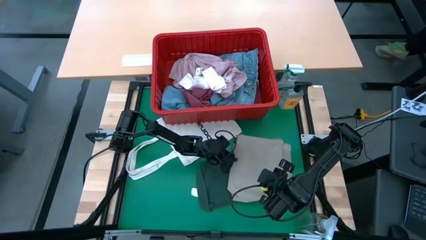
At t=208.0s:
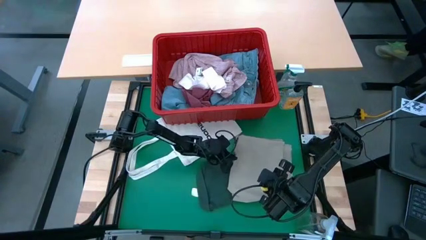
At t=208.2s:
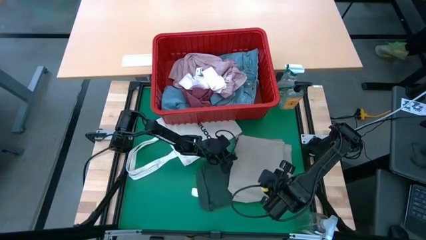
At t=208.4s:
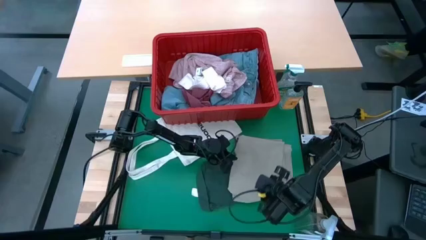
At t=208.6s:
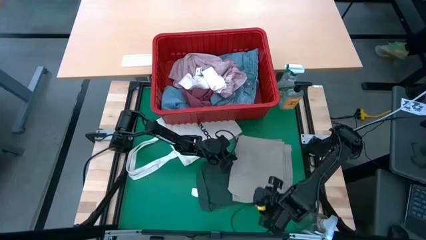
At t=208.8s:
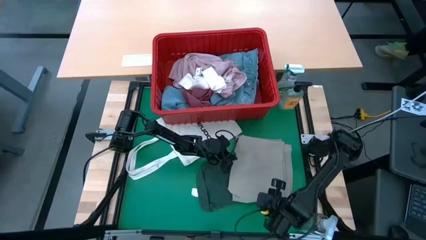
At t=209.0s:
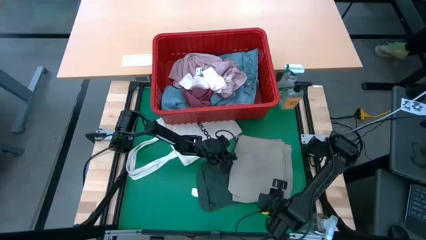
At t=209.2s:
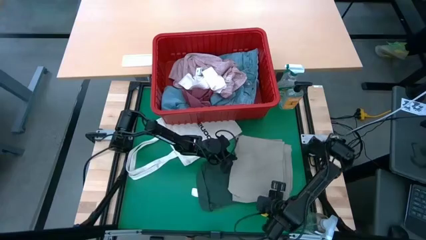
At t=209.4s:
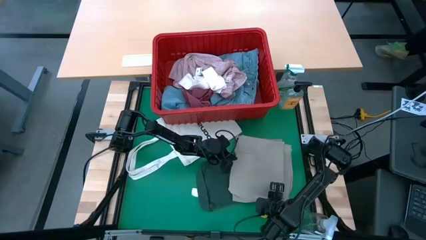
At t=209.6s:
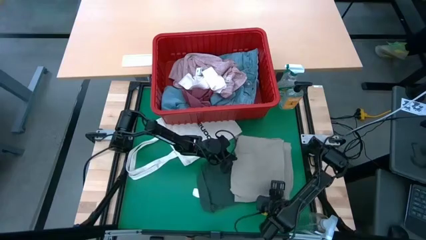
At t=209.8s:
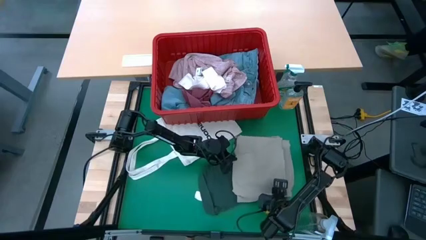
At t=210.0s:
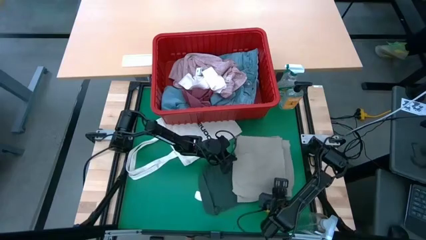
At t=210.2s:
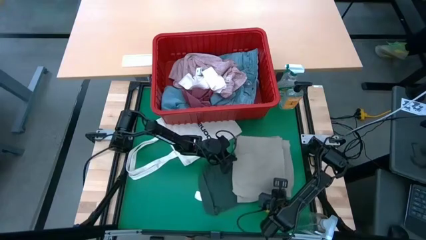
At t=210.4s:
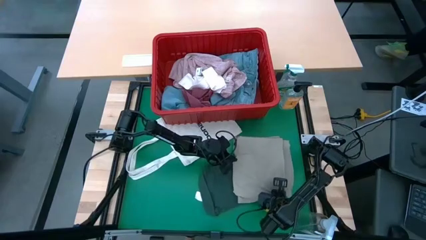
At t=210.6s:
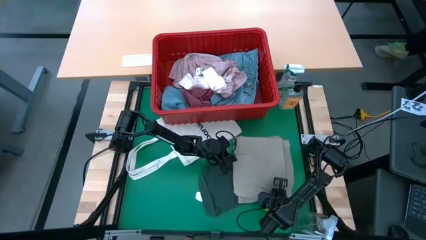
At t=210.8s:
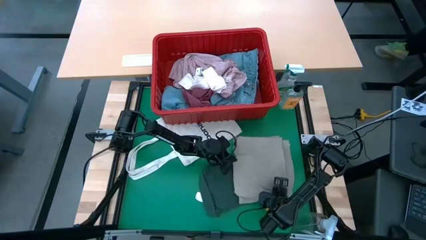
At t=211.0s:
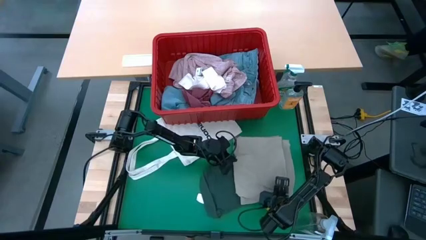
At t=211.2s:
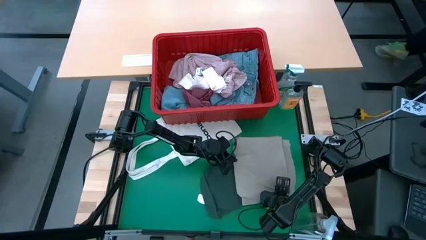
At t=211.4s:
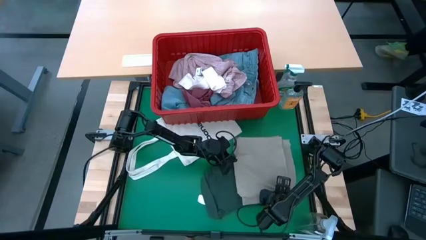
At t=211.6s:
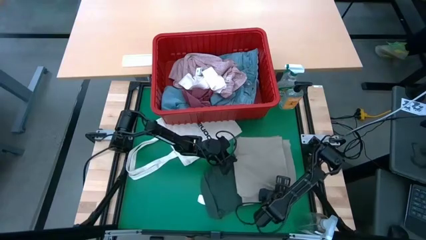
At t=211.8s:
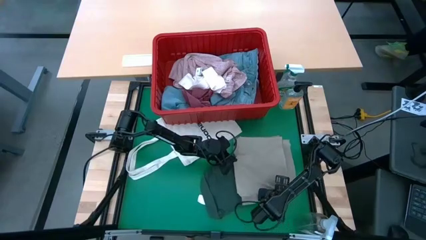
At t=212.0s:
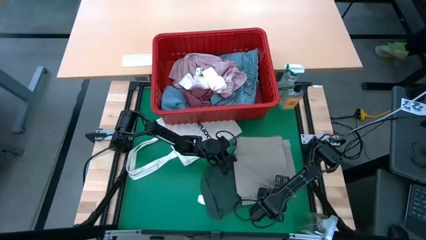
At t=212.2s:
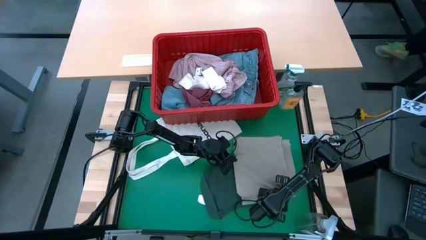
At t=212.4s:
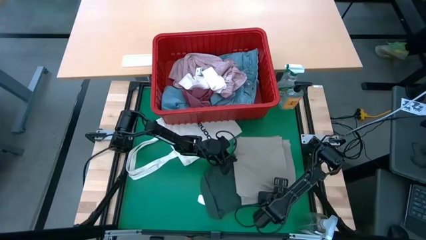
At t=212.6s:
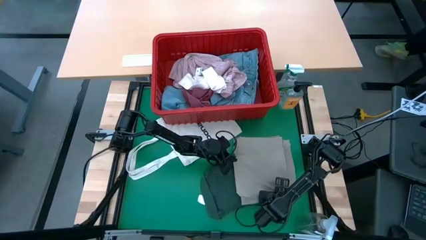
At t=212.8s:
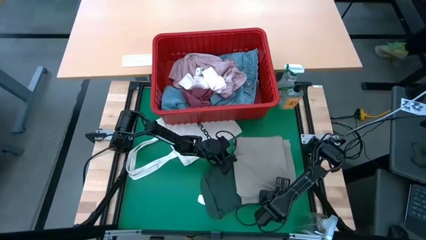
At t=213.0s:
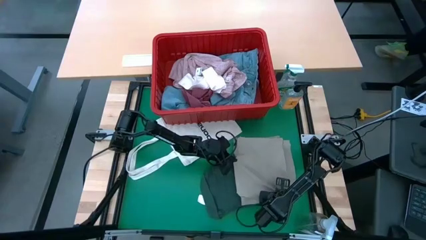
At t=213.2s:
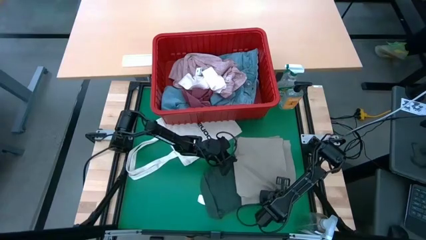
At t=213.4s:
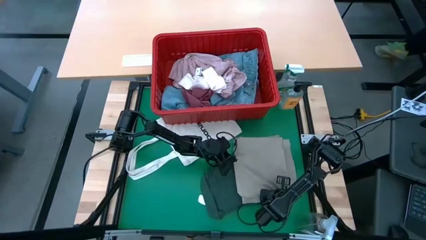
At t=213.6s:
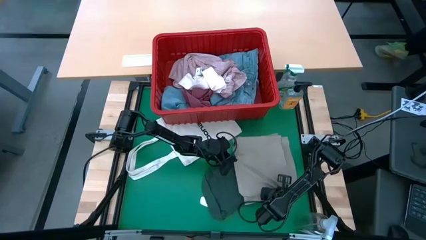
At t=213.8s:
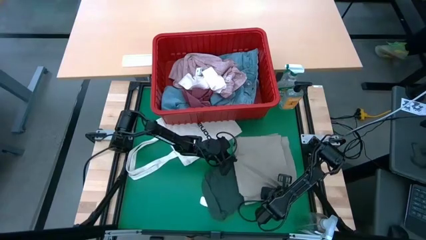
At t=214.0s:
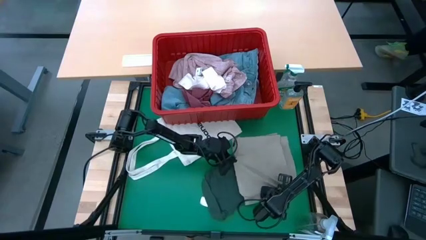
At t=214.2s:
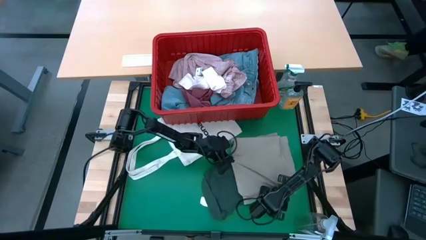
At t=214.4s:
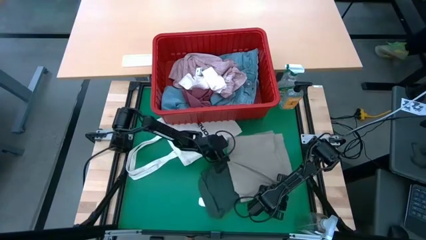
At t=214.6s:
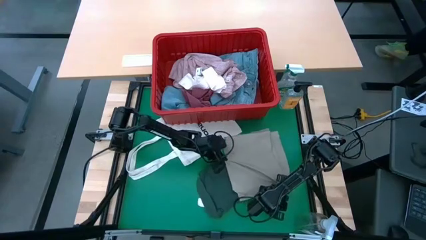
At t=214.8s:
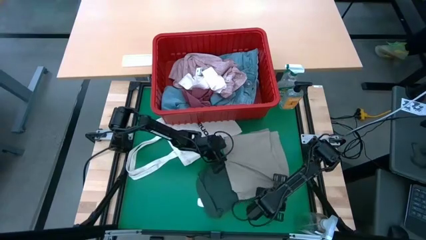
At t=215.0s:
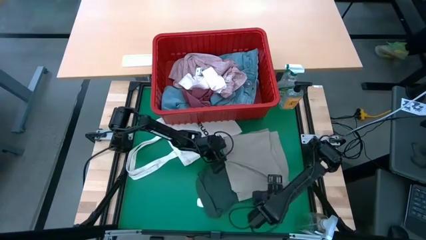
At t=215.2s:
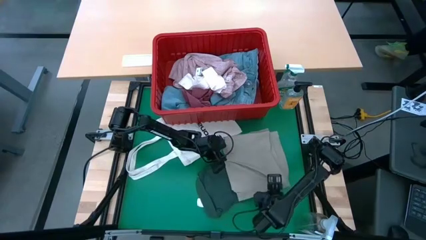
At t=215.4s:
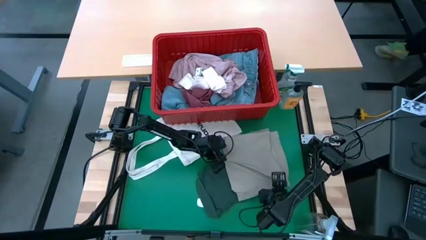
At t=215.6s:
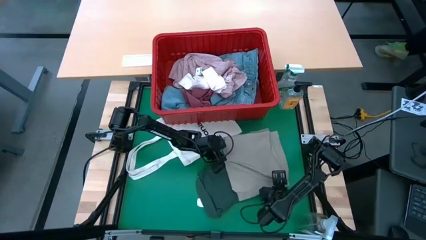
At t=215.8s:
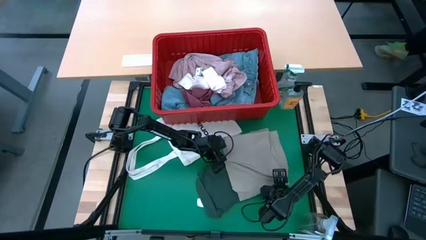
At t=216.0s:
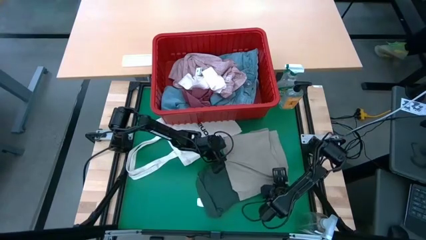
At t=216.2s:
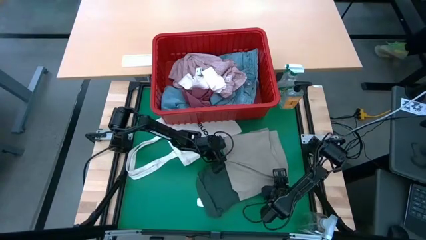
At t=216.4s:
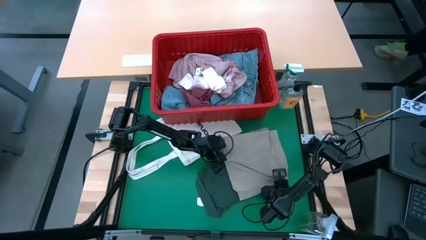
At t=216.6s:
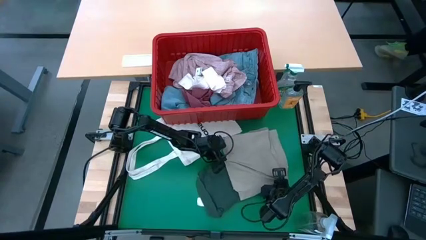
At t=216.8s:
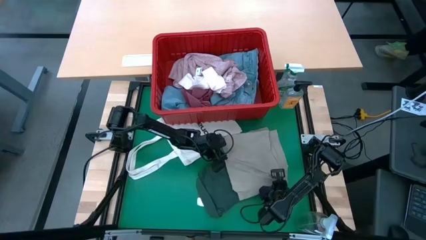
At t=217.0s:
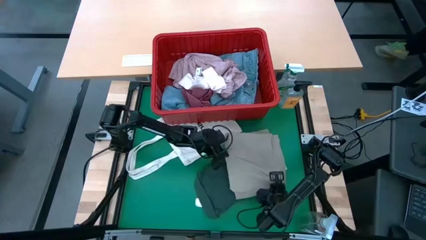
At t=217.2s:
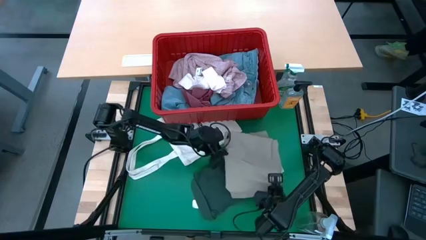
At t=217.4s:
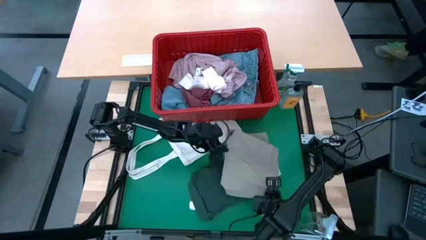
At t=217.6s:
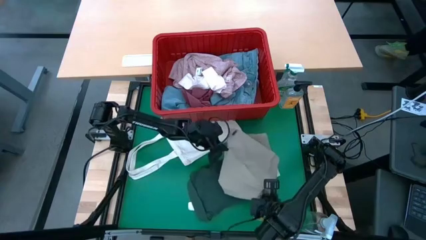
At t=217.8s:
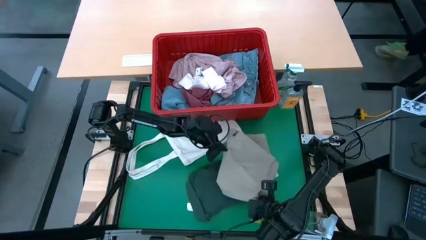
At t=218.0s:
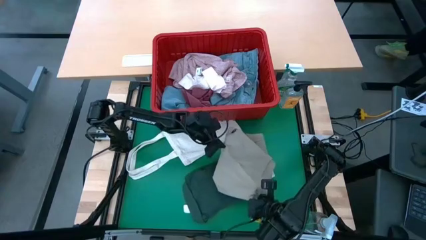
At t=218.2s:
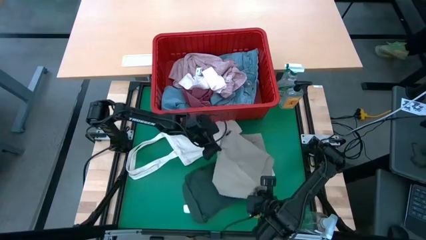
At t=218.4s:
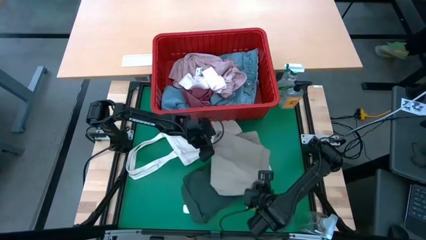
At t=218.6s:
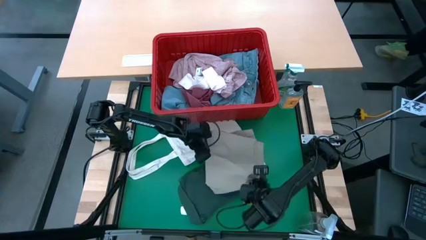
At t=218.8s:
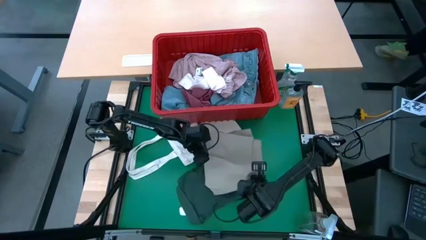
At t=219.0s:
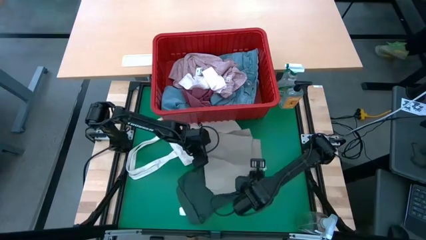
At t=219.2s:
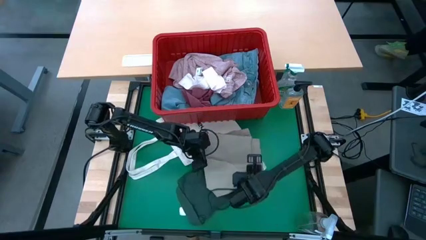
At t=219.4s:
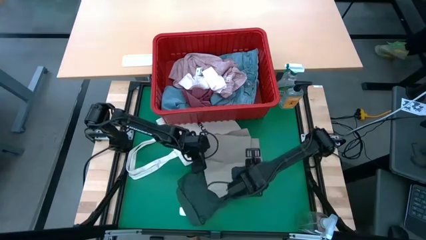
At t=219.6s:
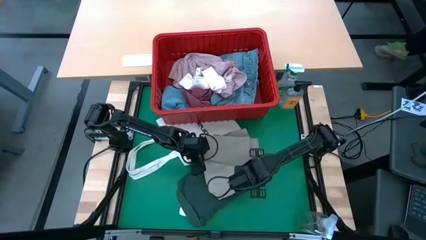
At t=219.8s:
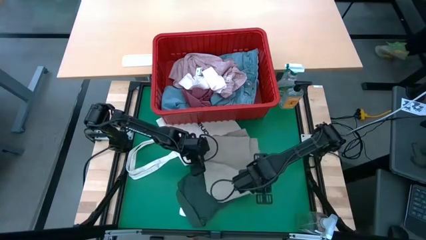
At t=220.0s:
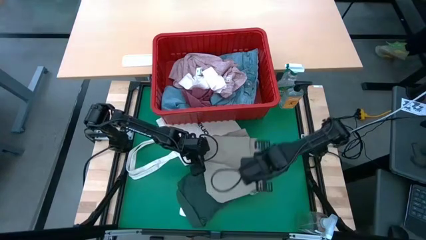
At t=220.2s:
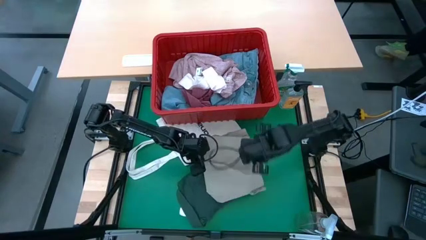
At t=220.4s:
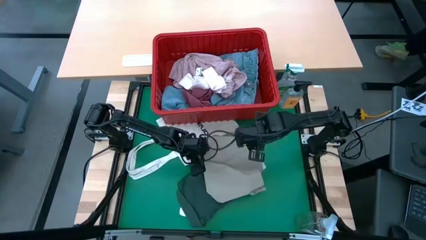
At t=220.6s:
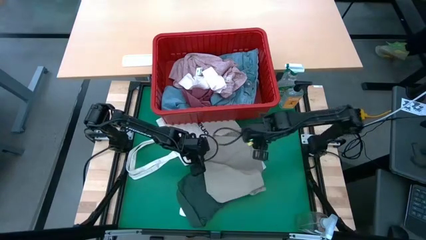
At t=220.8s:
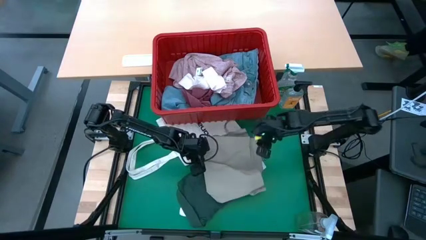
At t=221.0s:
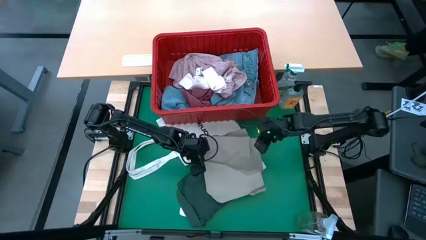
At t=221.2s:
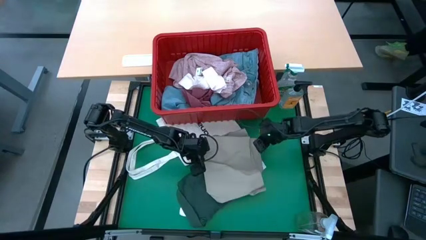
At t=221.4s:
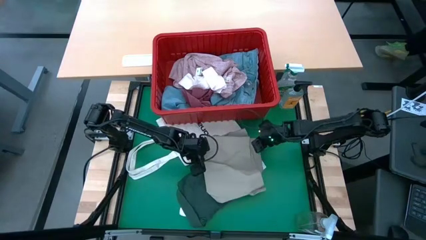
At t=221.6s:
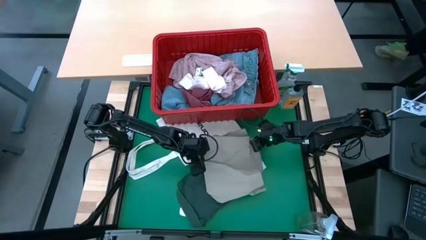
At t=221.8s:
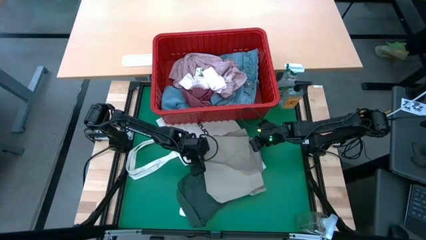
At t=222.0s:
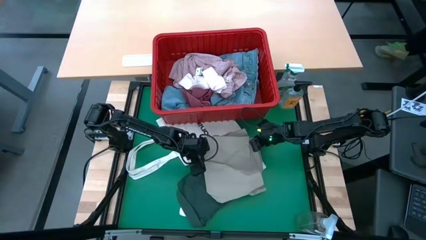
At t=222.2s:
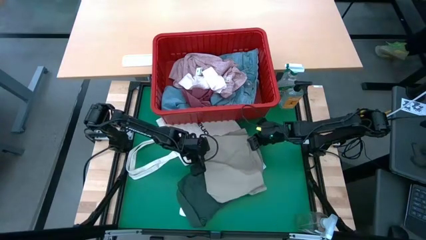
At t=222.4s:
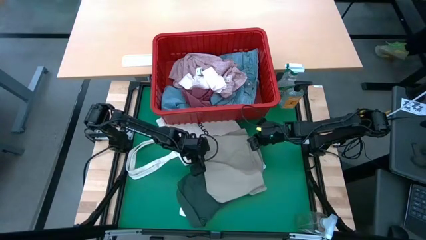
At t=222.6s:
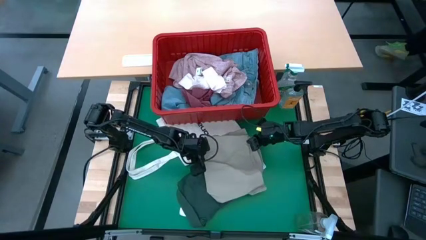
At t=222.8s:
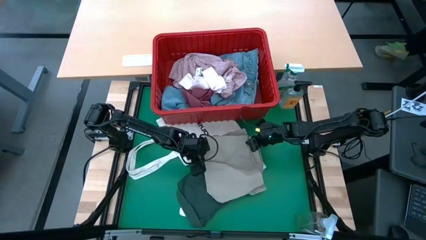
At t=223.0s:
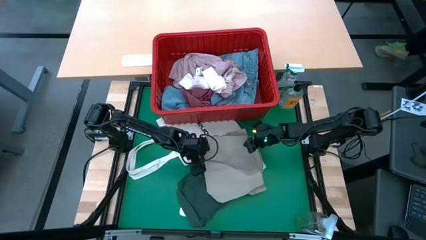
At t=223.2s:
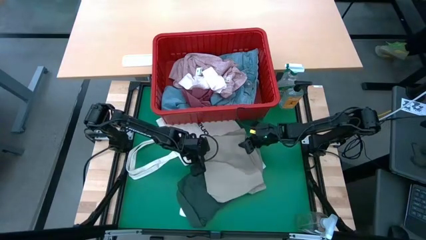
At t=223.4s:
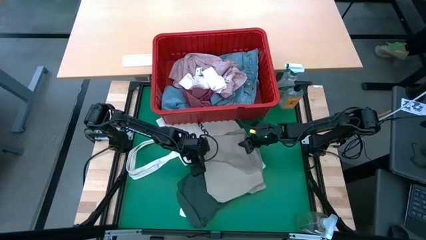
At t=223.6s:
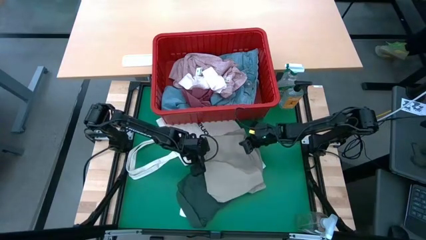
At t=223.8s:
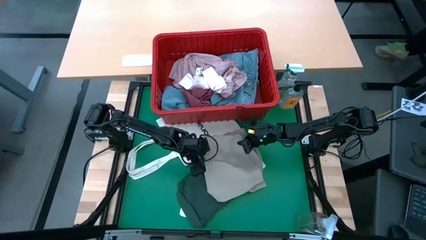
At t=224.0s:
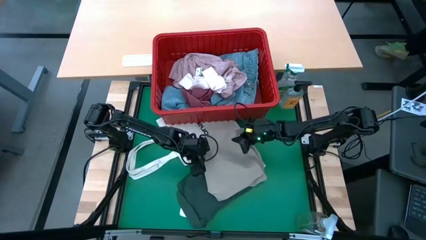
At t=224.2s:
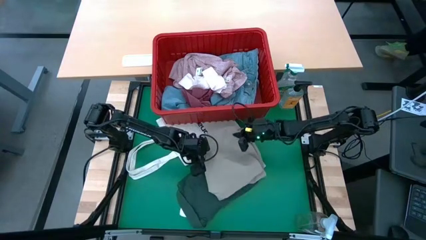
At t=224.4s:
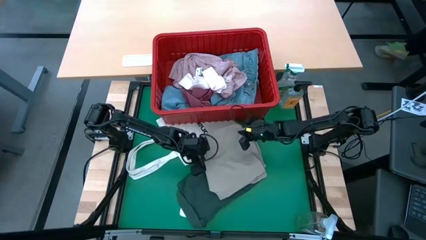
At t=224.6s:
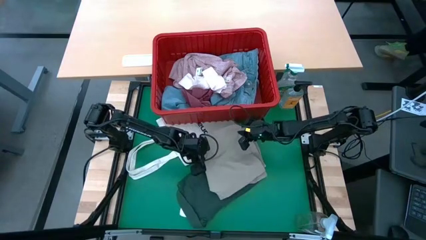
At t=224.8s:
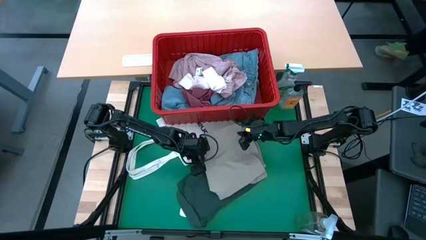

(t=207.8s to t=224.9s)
Task: Fold laundry
Fold the grey shorts
